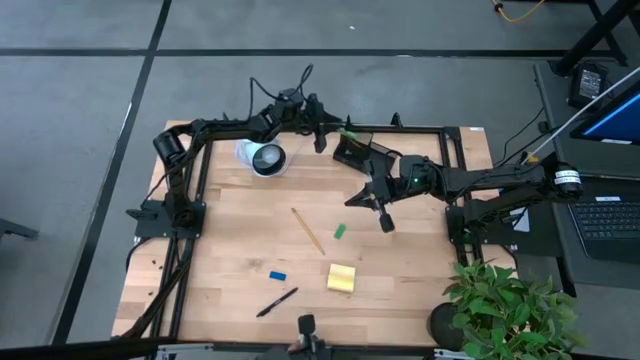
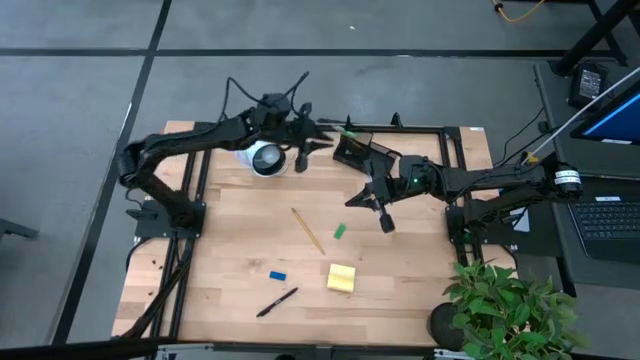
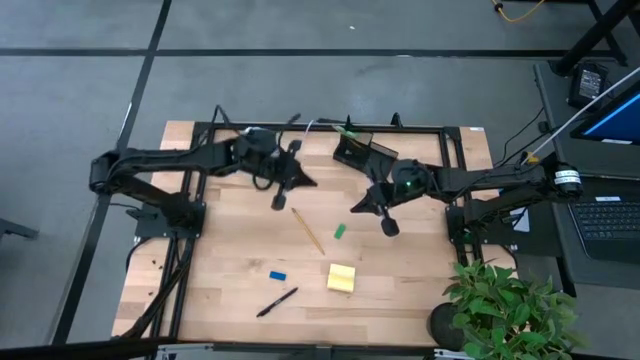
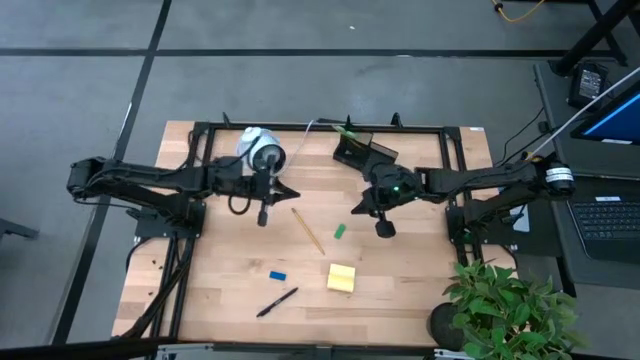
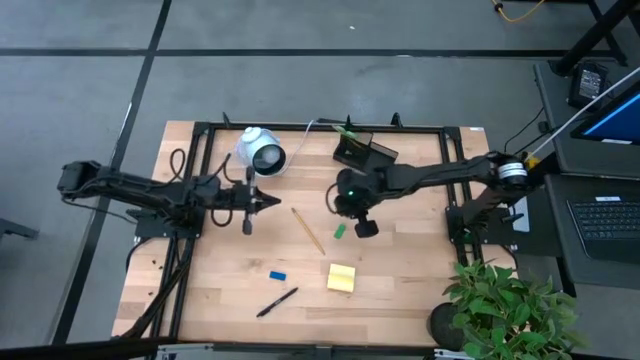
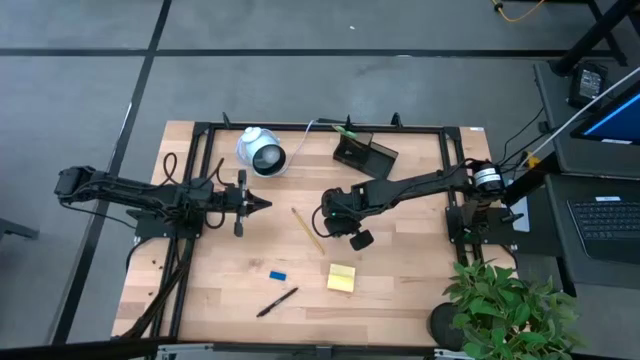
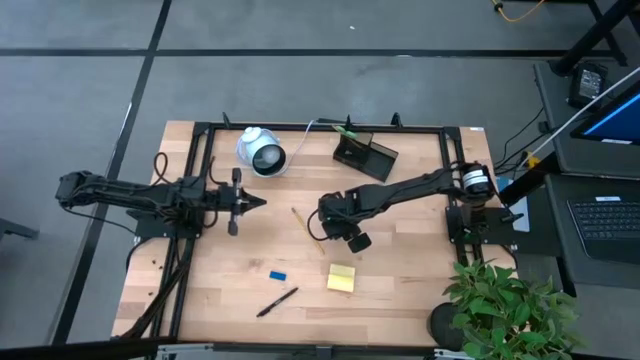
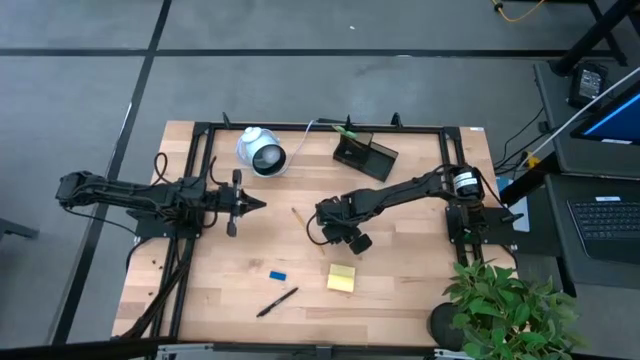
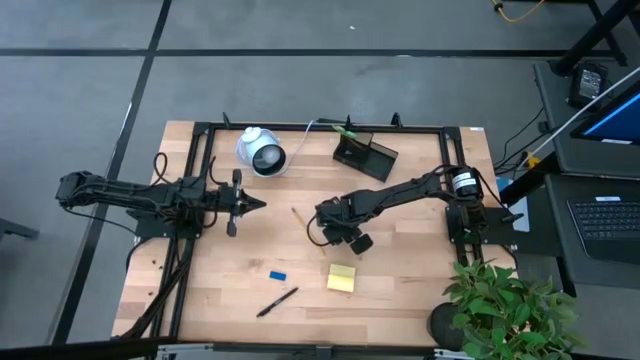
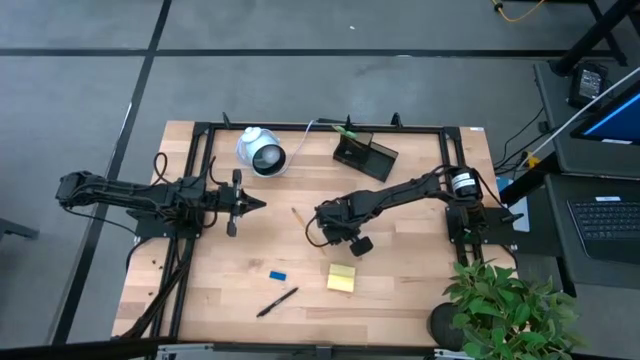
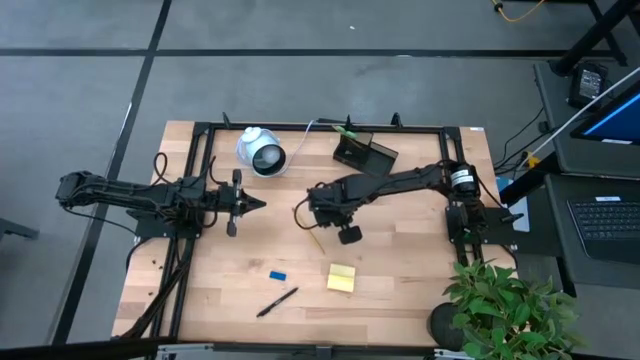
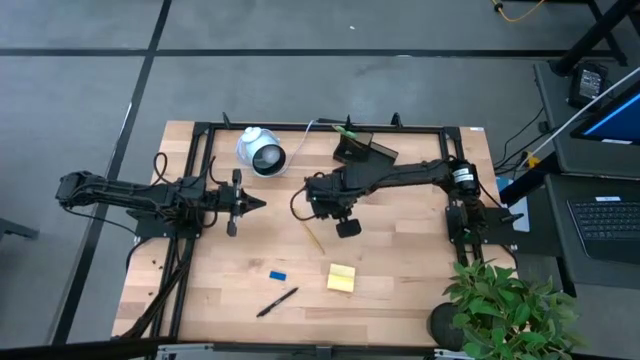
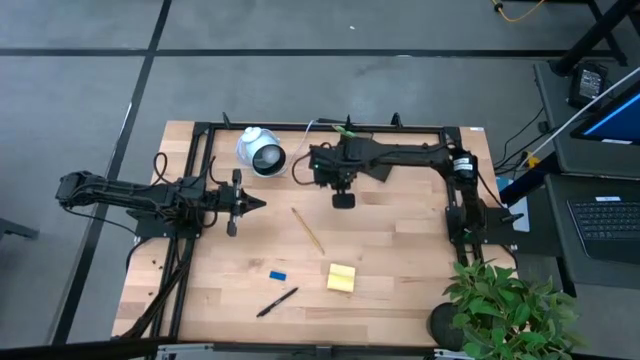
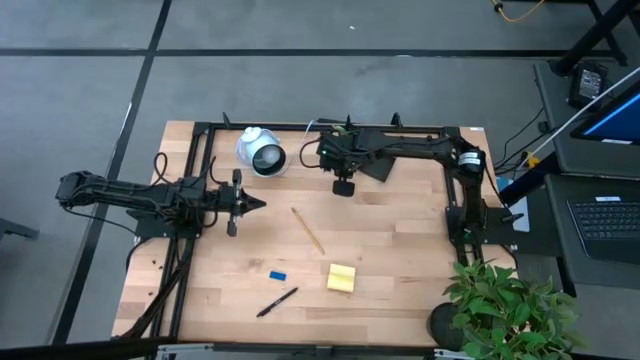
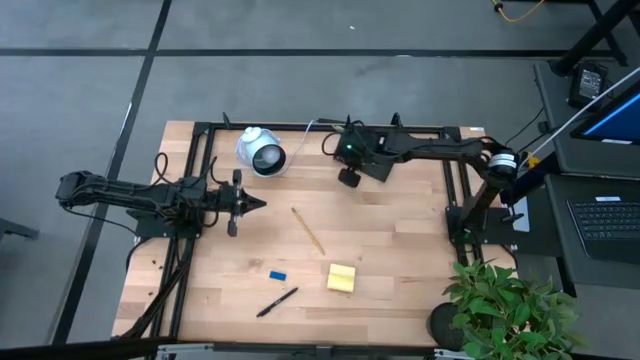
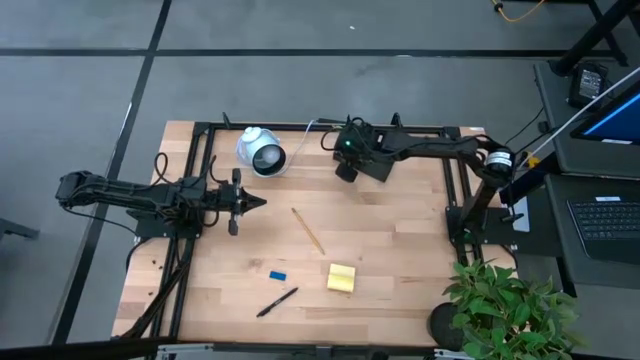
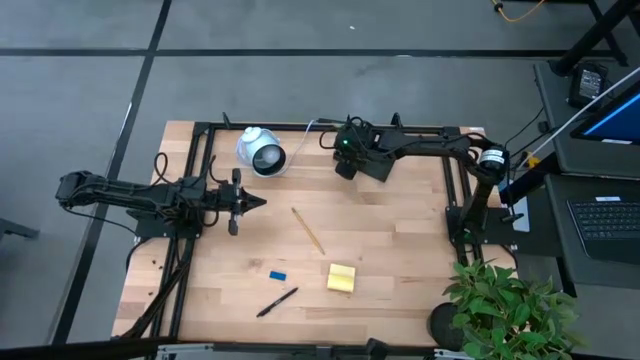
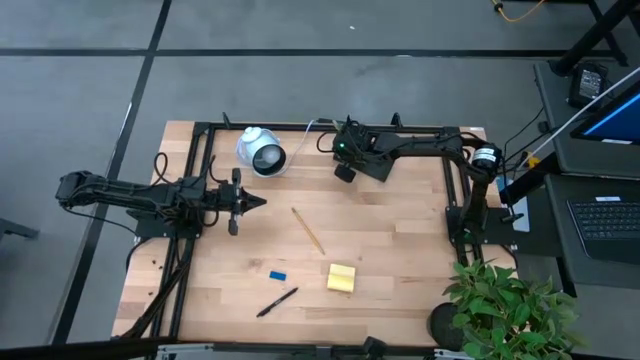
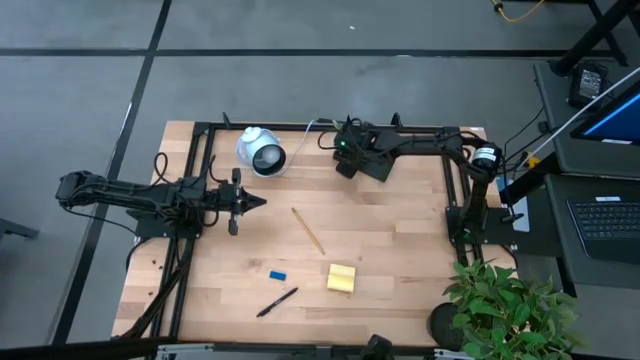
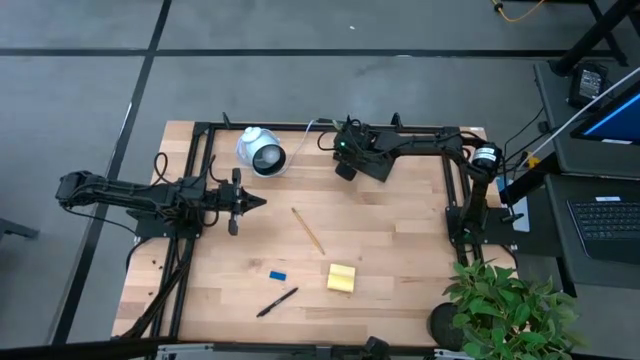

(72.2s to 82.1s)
Task: Pick and place office supplies into organizer
Put the green eraser into the desk organizer

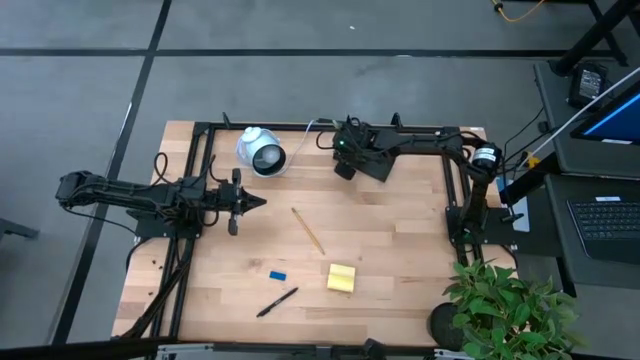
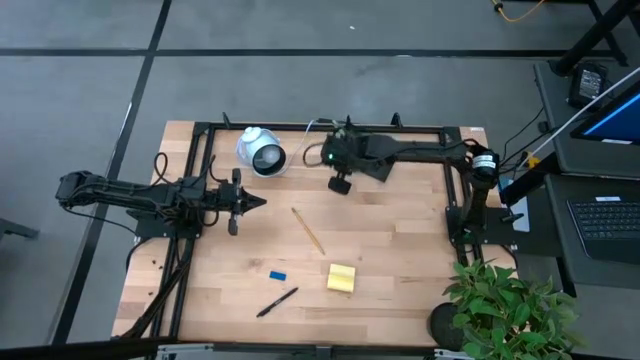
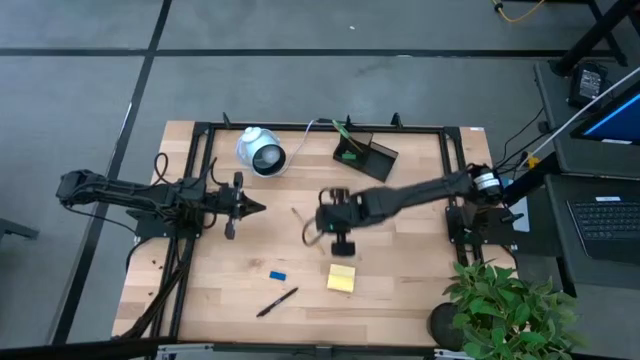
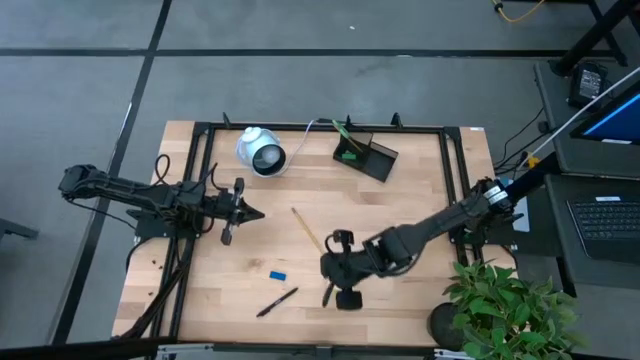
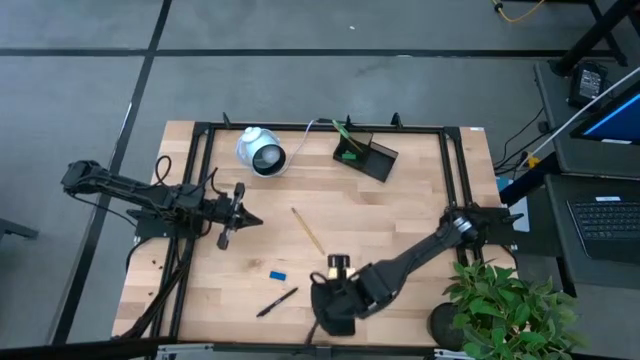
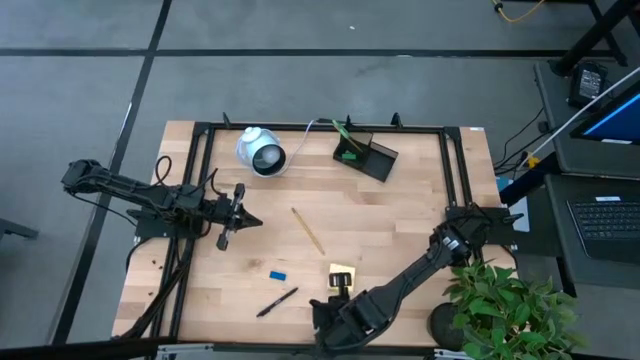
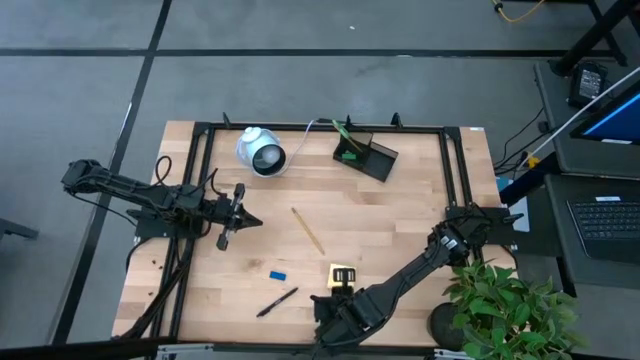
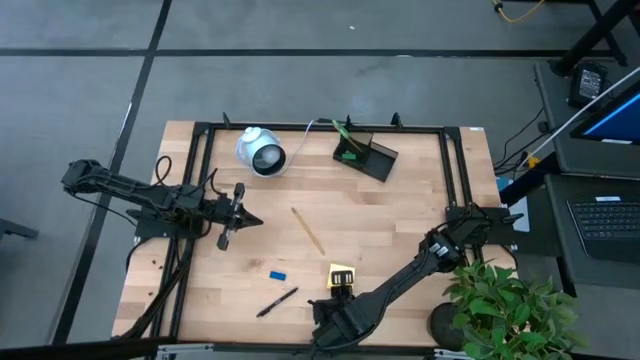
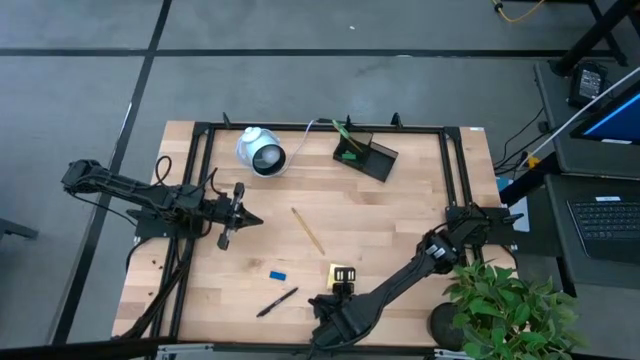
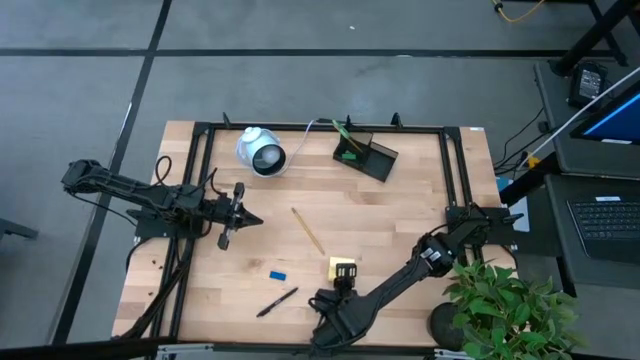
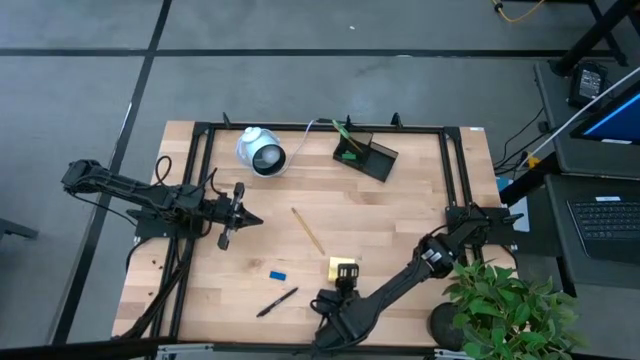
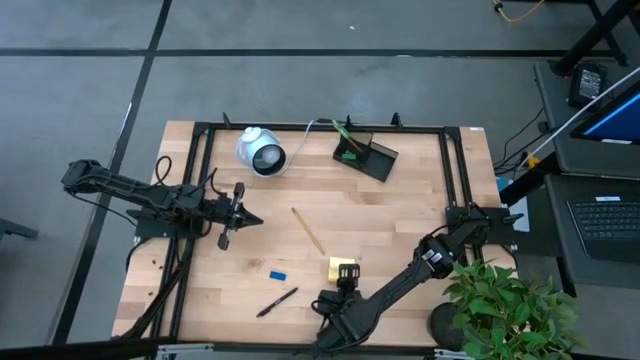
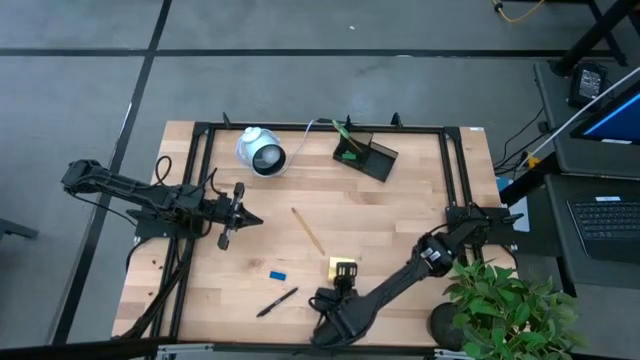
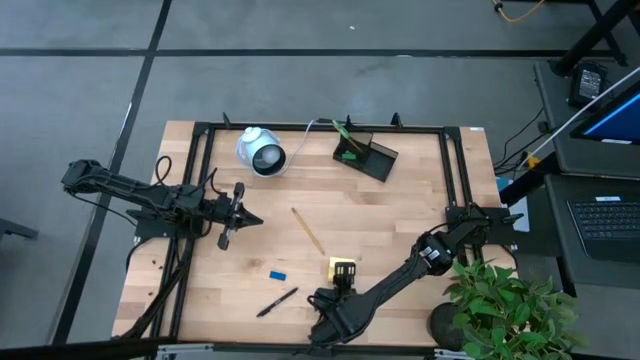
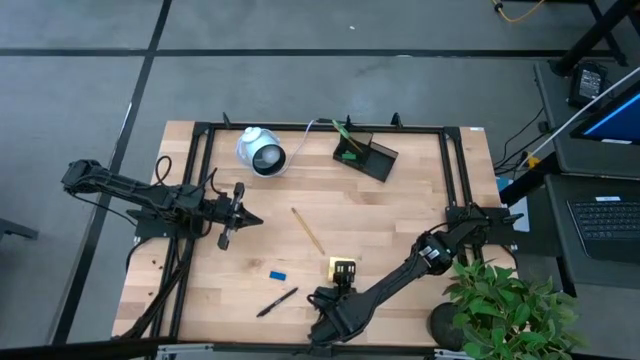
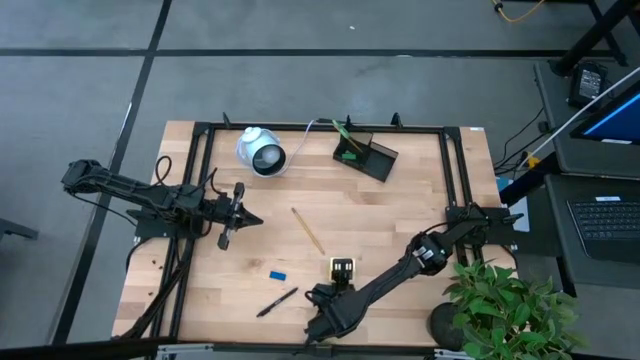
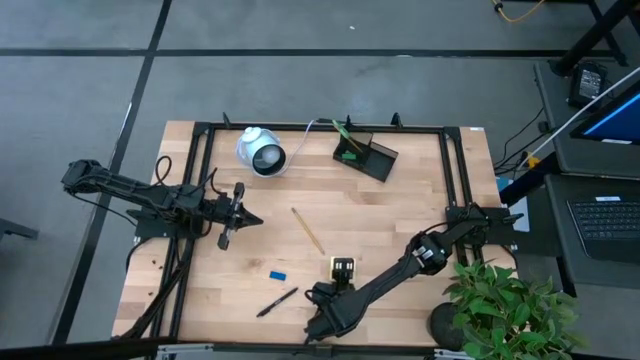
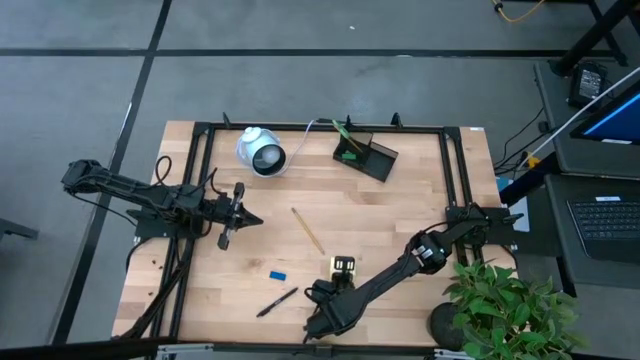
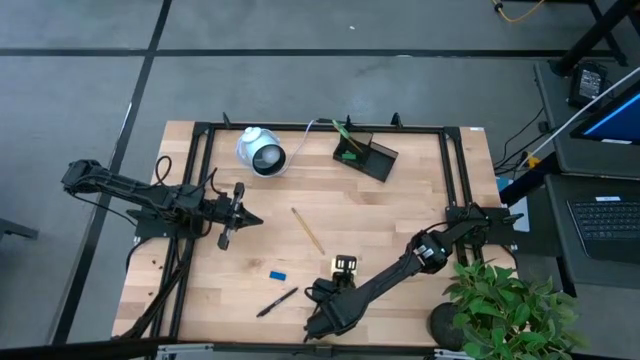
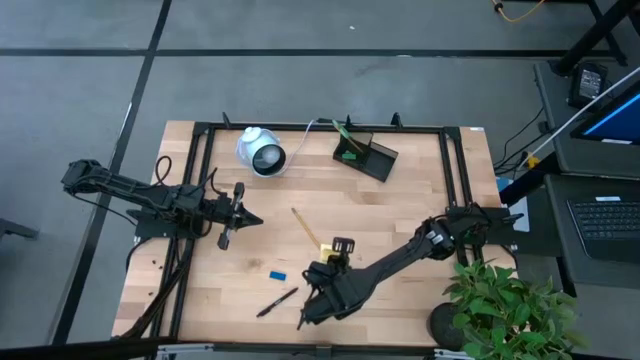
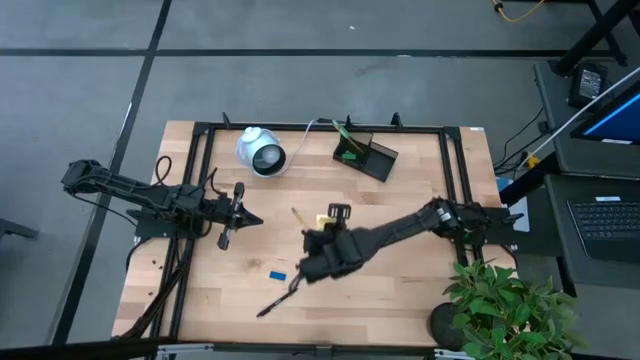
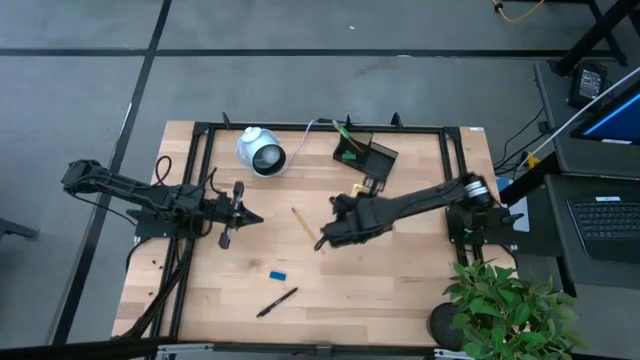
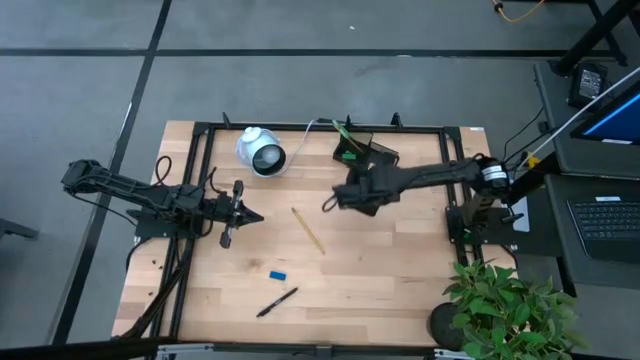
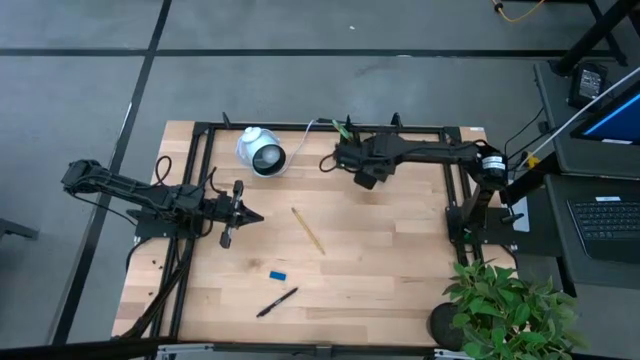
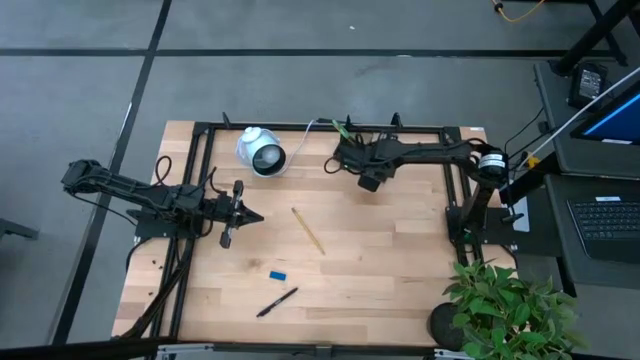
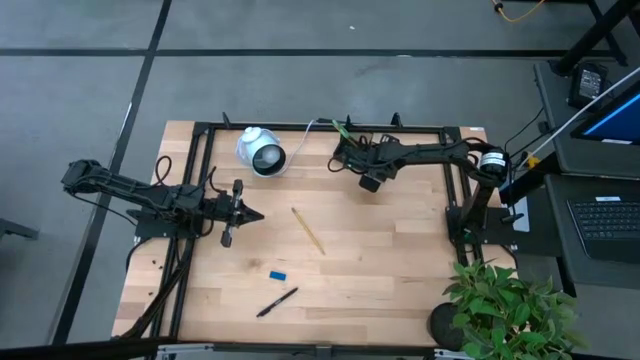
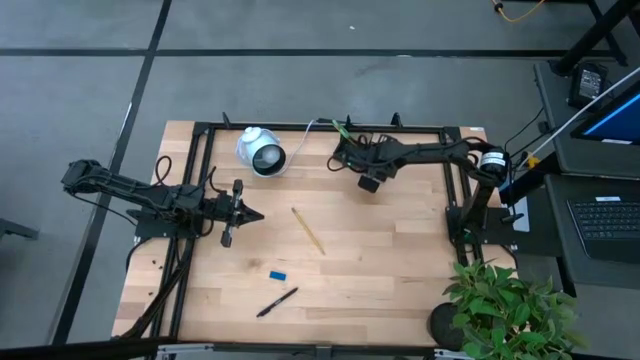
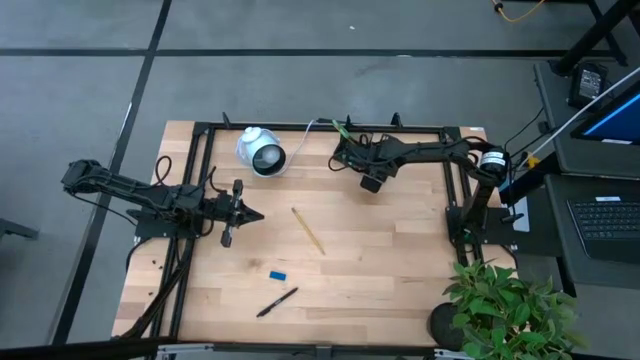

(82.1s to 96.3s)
Put the yellow sticky note pad into the desk organizer
